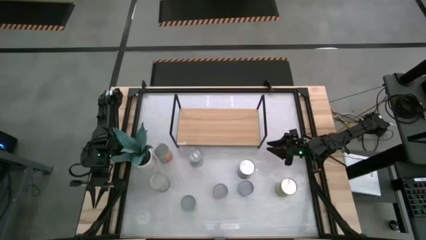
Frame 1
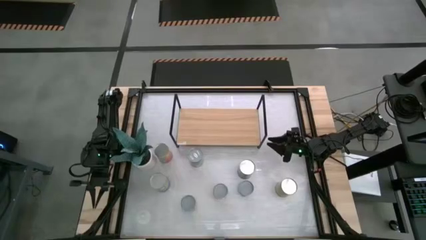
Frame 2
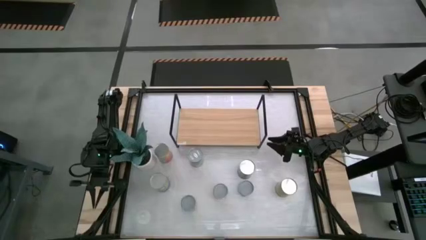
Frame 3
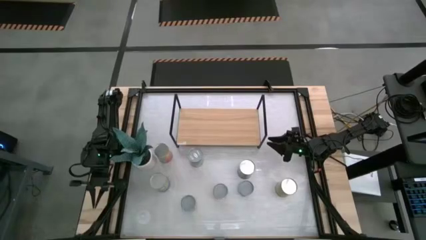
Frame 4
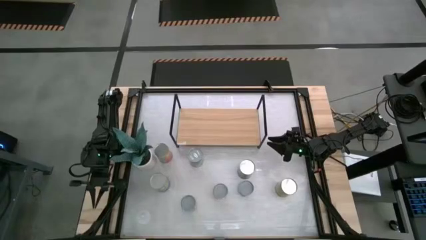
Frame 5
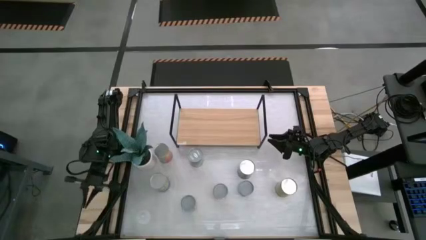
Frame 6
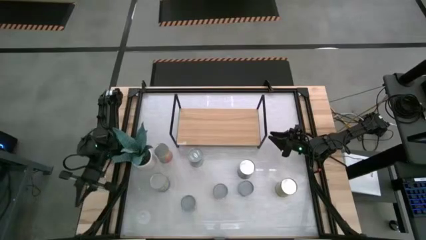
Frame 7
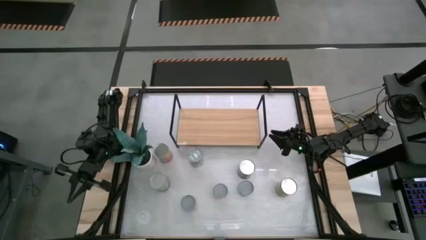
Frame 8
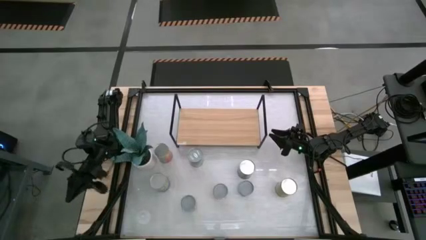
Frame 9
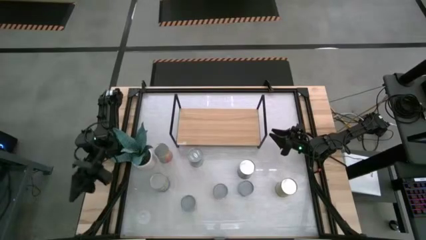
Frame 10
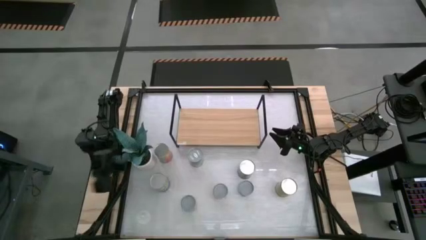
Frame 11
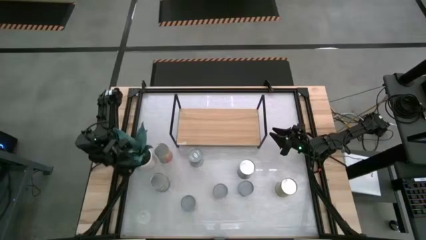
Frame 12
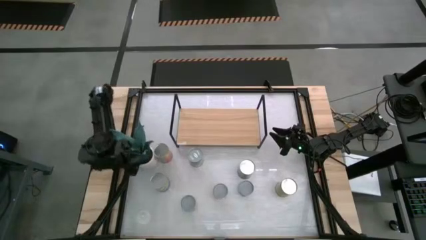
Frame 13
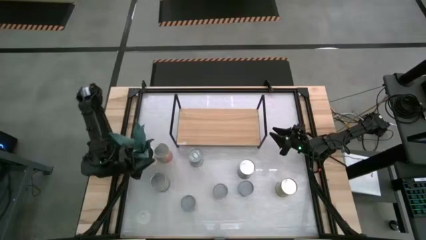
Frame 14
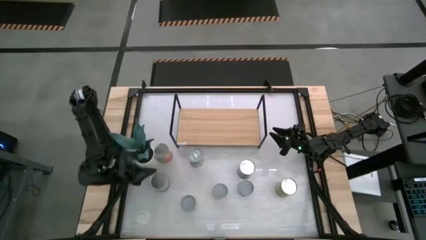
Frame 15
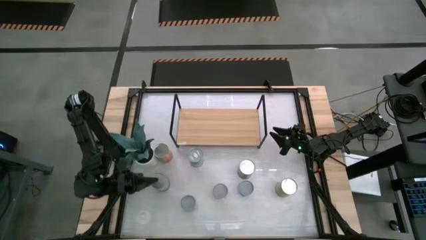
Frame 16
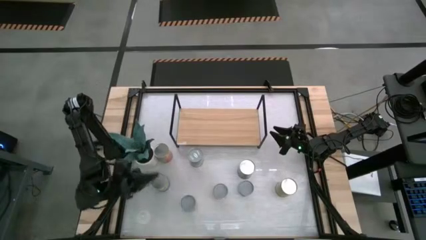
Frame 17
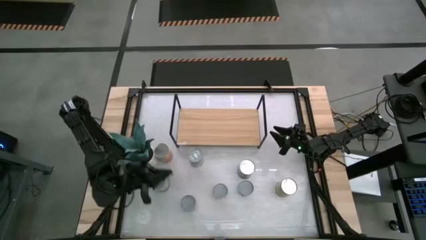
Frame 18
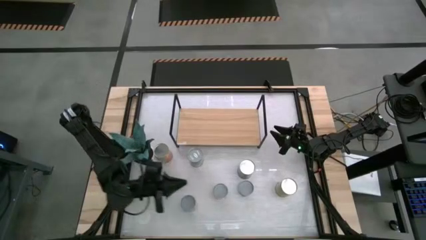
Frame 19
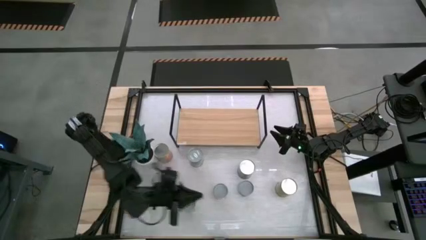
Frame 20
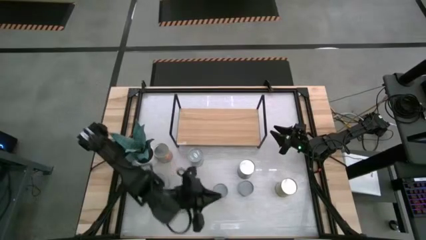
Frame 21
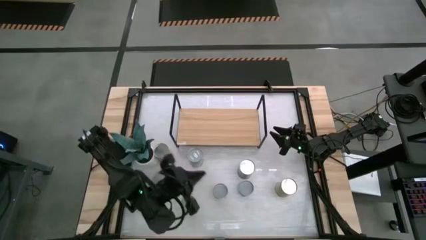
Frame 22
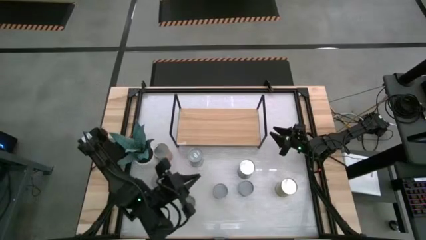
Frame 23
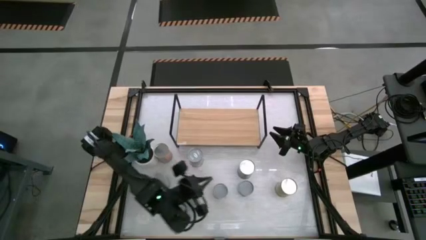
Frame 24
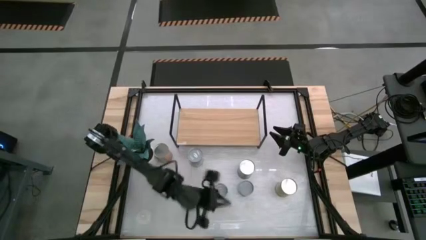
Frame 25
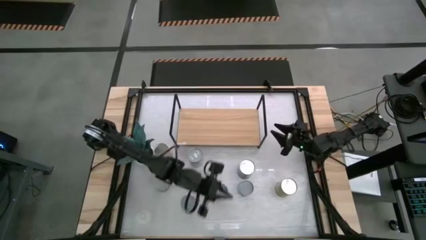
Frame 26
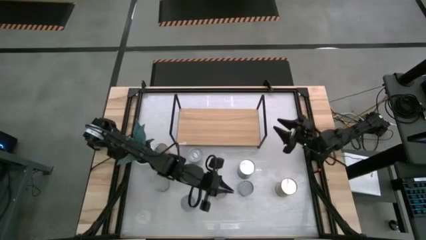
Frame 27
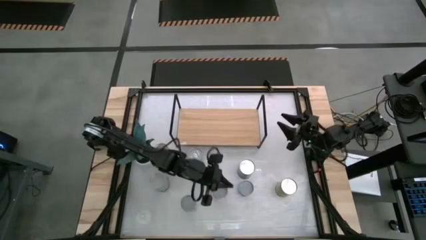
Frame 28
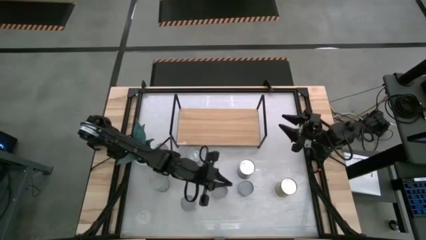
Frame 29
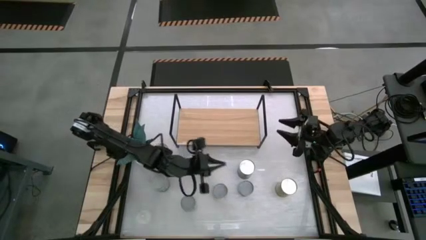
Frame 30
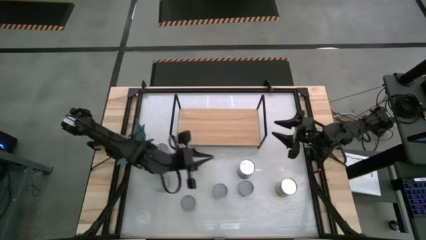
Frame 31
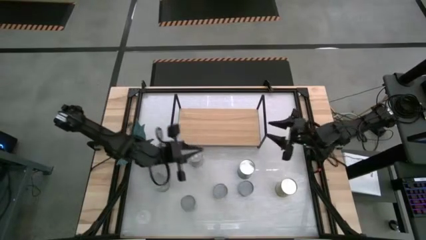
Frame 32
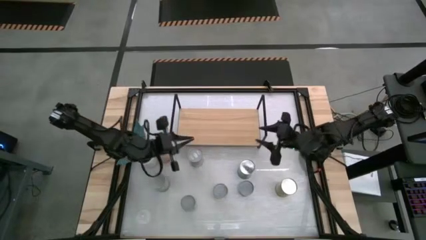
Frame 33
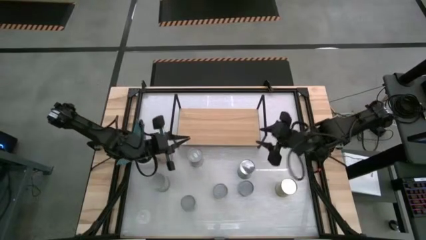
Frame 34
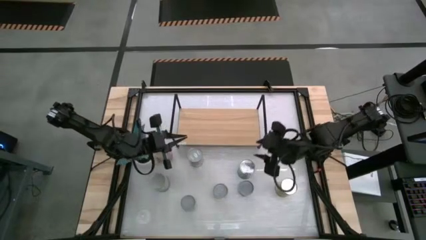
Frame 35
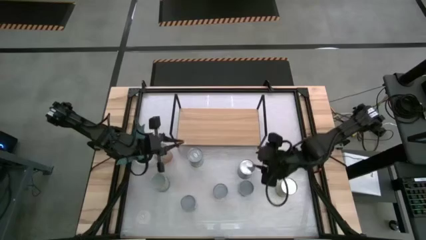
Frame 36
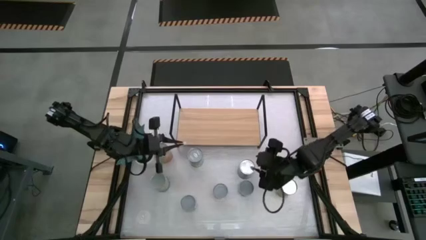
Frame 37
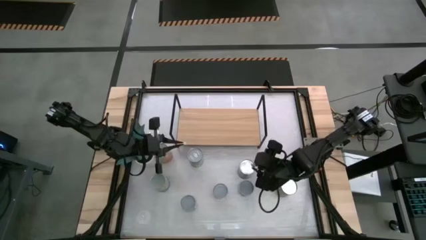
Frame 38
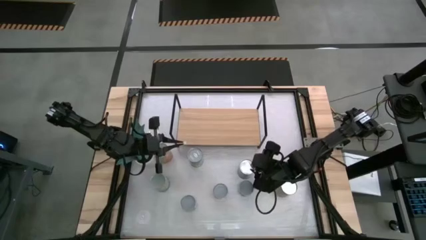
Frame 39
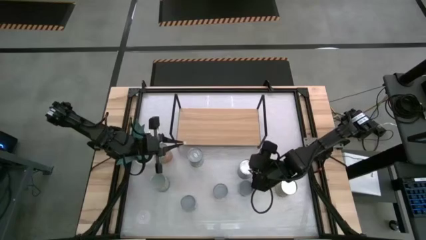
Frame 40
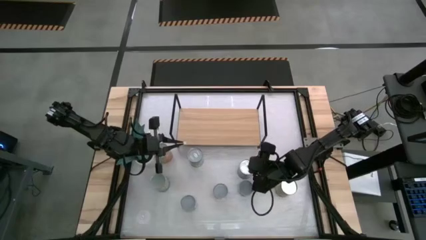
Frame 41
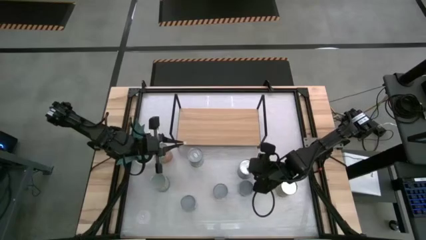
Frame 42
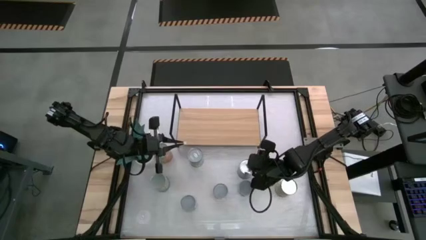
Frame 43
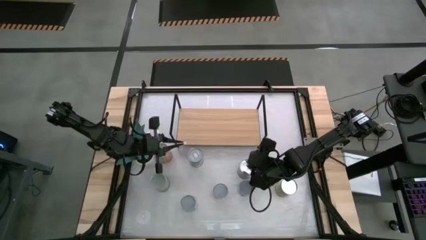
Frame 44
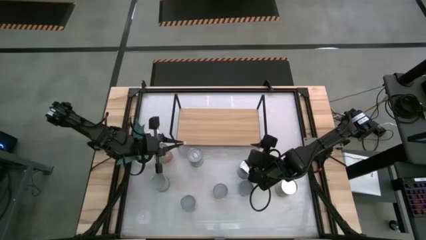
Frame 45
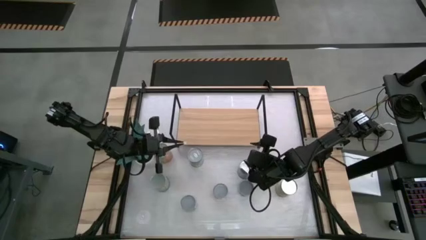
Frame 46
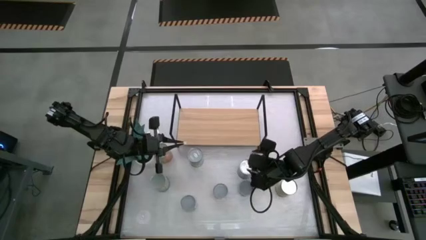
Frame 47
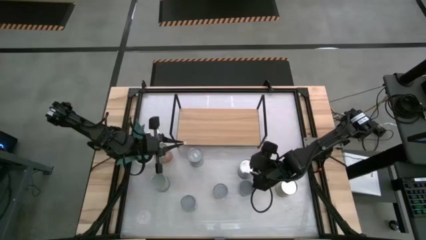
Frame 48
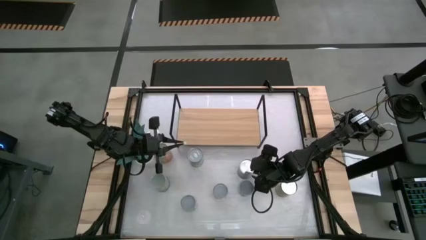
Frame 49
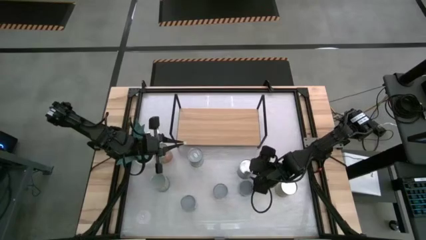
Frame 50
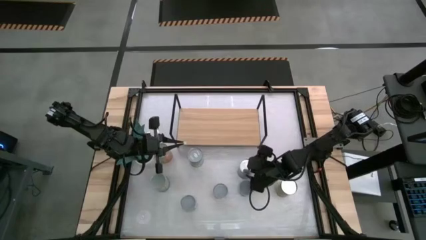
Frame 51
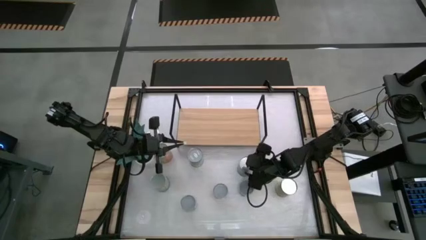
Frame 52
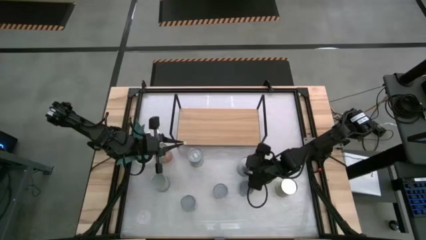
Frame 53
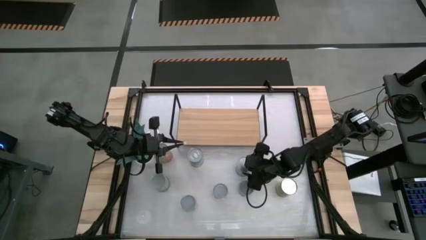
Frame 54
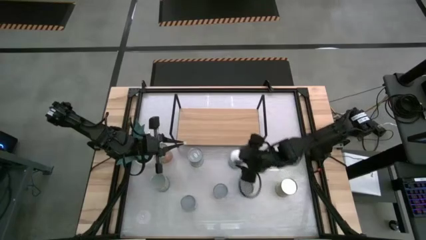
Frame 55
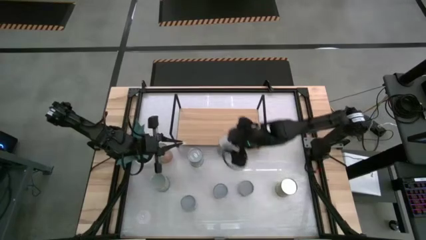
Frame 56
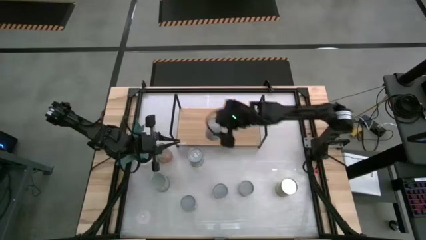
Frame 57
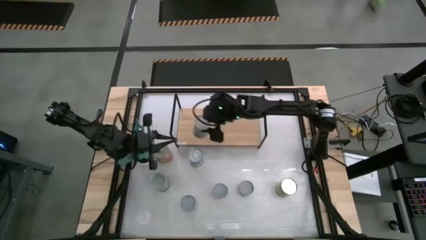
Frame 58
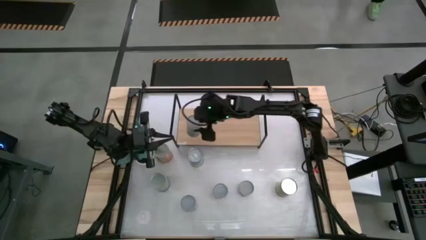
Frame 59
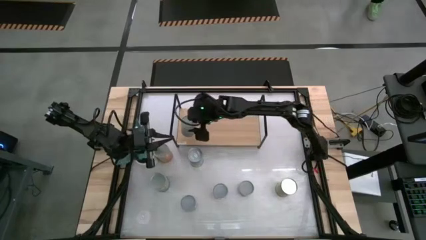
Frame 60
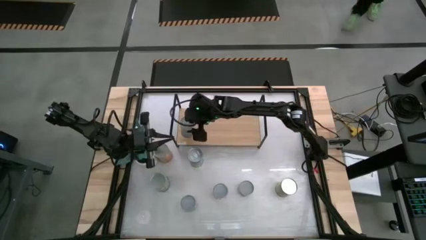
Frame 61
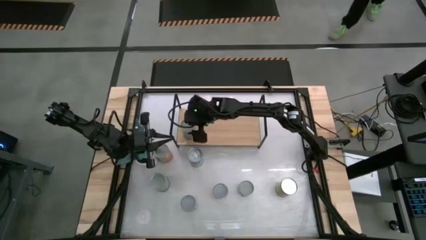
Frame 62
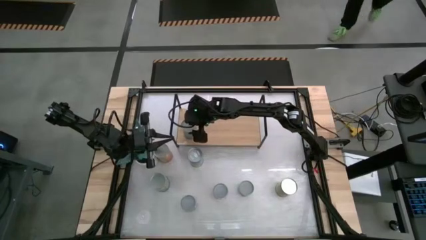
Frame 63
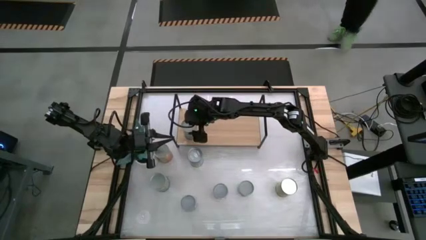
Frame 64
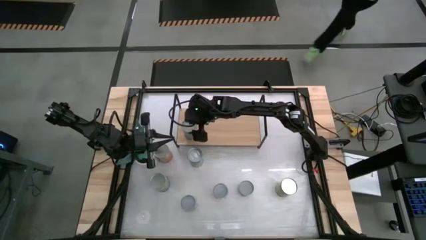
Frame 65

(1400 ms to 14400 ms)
Task: Pick and place cans onto a shelf
Put the large canned cherries on the shelf
